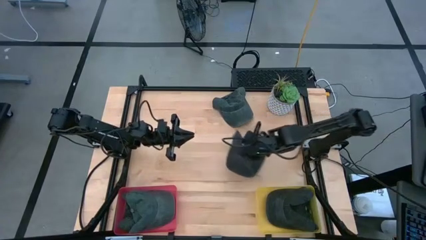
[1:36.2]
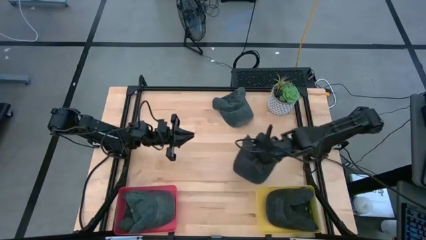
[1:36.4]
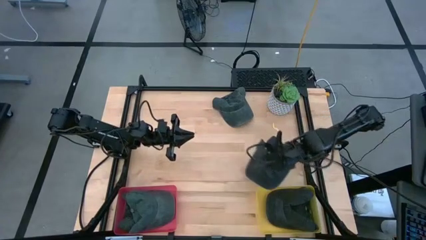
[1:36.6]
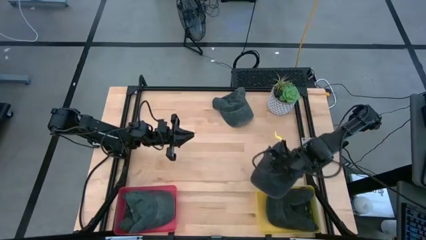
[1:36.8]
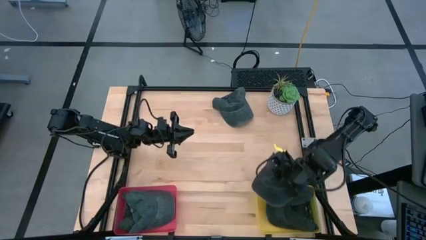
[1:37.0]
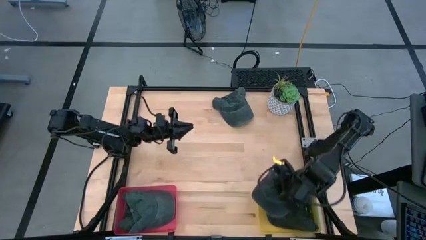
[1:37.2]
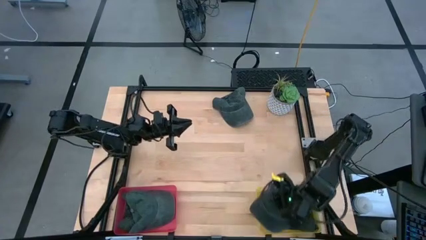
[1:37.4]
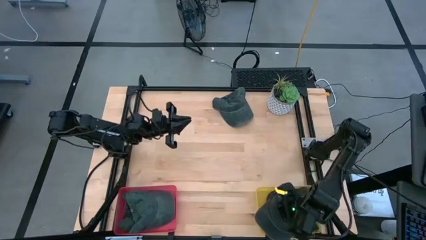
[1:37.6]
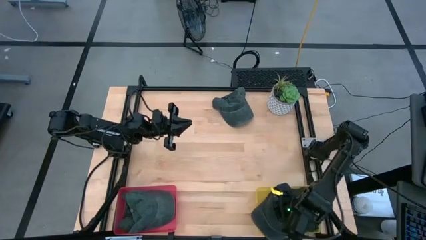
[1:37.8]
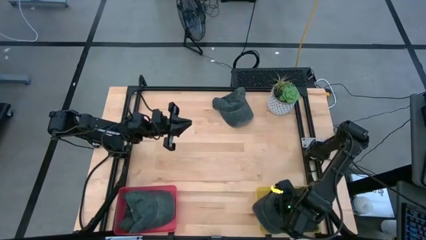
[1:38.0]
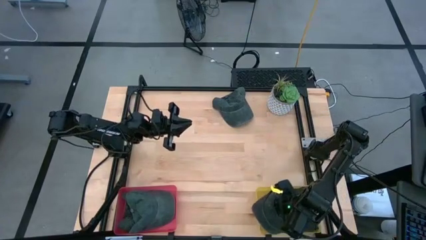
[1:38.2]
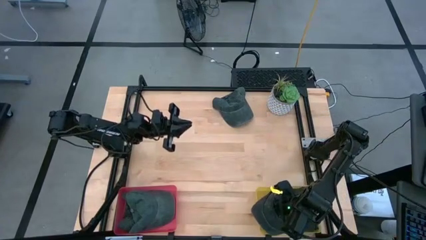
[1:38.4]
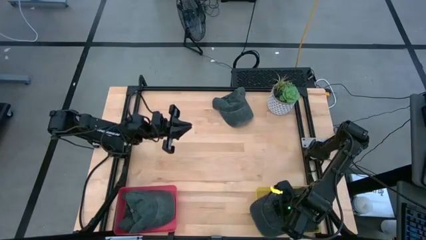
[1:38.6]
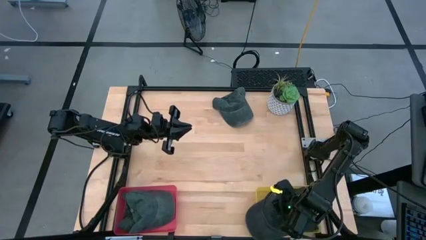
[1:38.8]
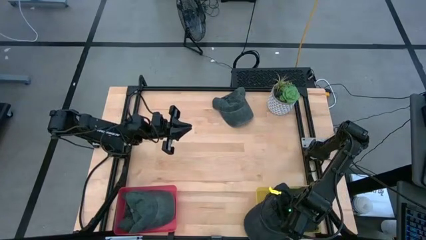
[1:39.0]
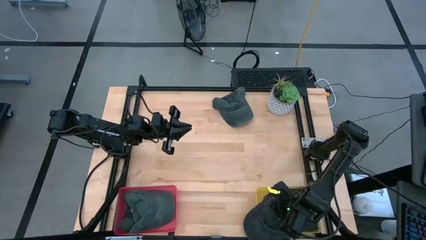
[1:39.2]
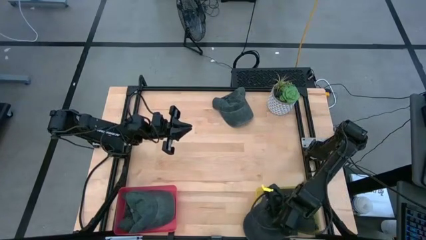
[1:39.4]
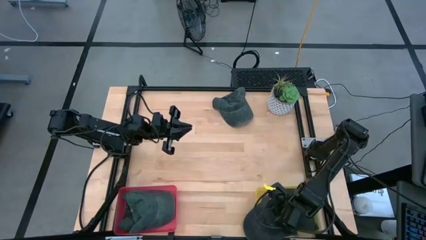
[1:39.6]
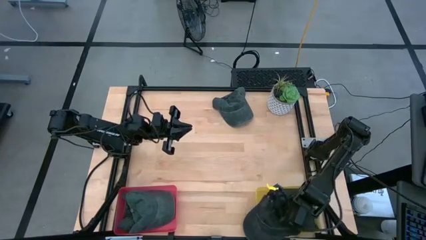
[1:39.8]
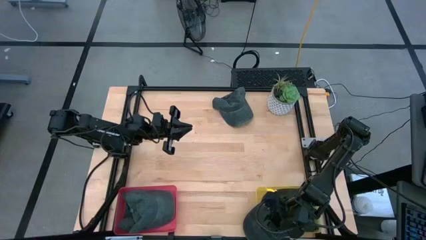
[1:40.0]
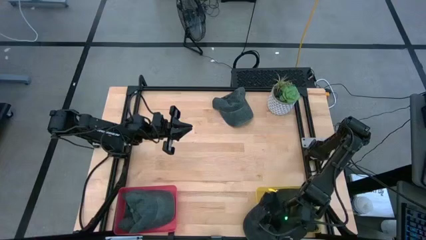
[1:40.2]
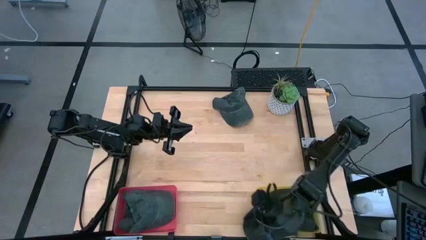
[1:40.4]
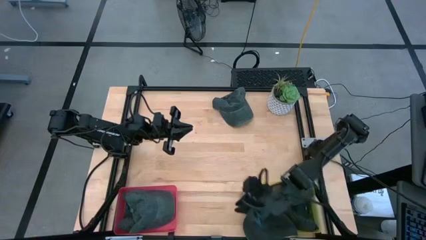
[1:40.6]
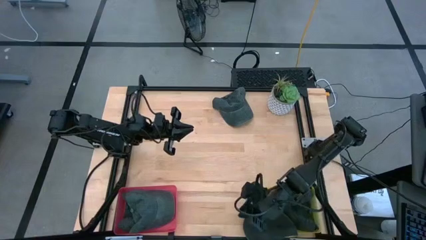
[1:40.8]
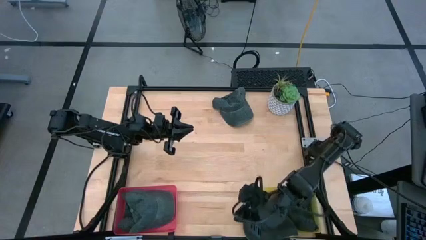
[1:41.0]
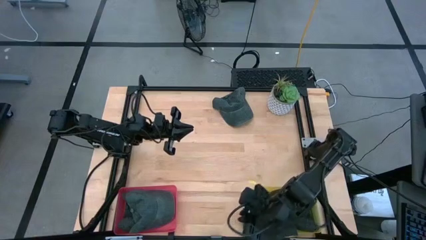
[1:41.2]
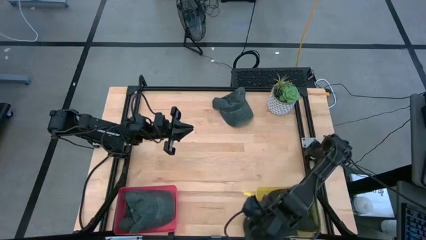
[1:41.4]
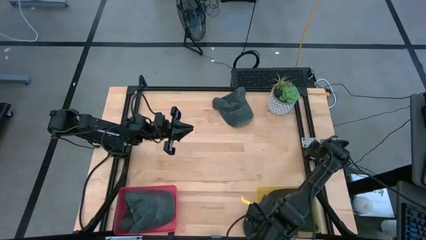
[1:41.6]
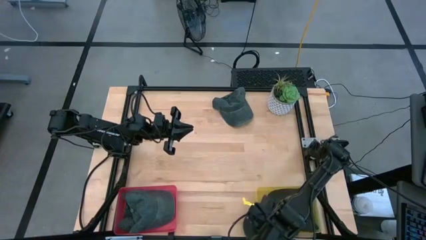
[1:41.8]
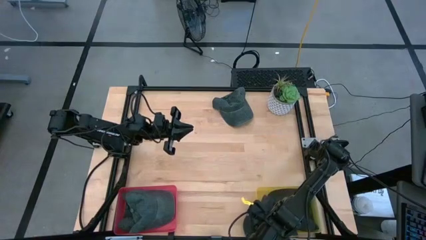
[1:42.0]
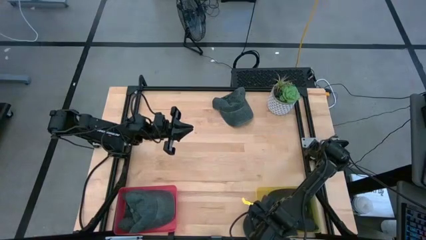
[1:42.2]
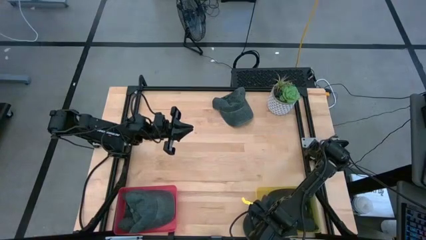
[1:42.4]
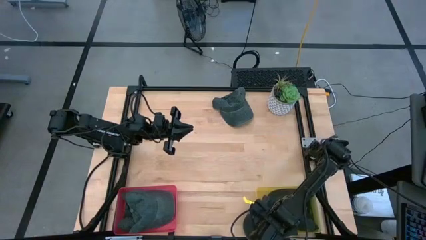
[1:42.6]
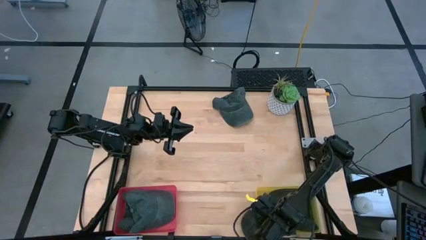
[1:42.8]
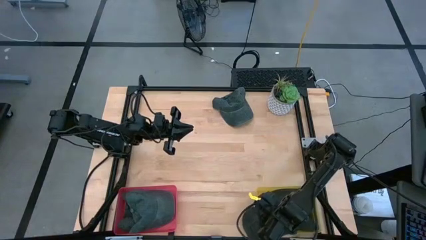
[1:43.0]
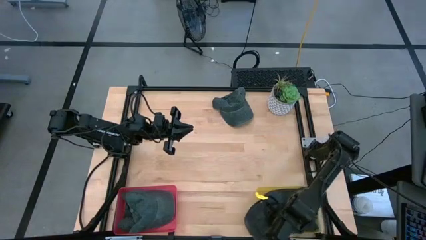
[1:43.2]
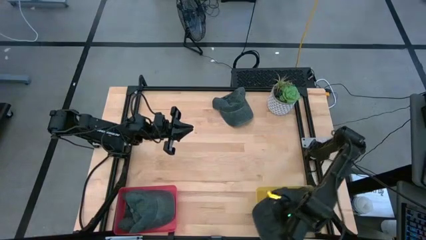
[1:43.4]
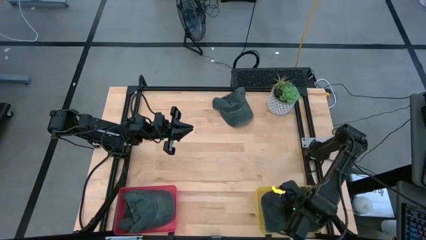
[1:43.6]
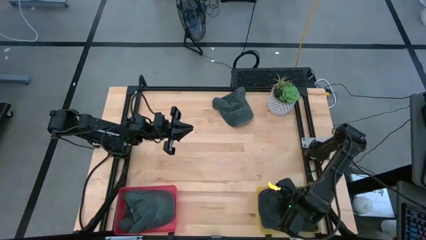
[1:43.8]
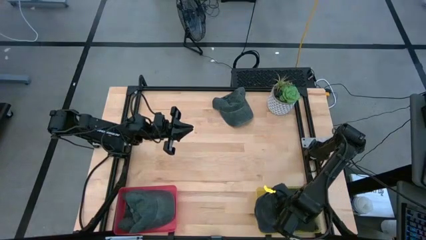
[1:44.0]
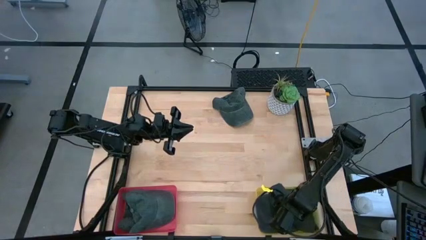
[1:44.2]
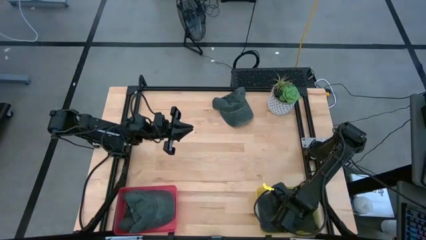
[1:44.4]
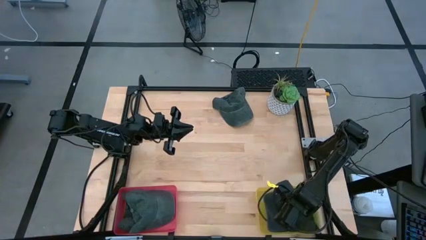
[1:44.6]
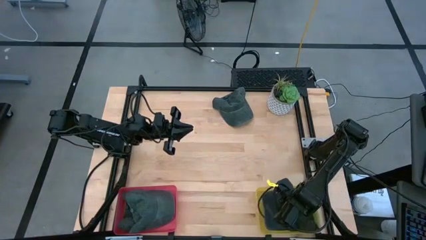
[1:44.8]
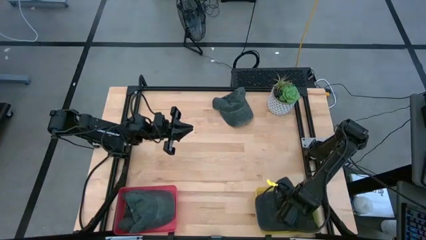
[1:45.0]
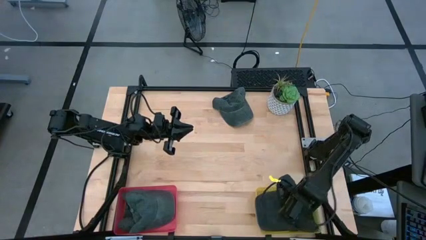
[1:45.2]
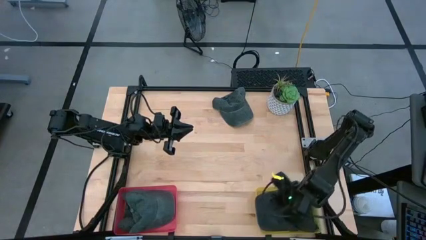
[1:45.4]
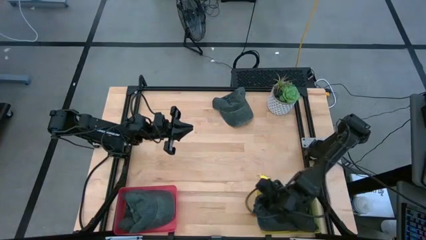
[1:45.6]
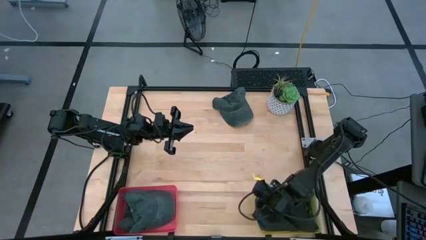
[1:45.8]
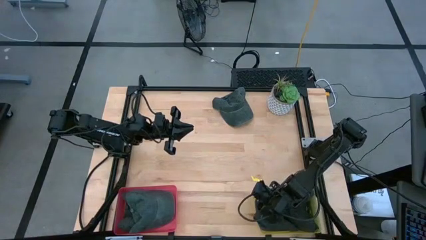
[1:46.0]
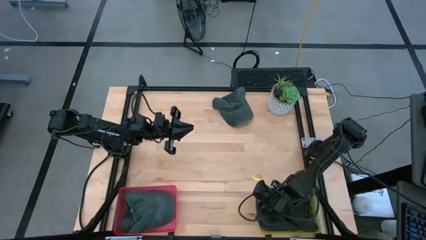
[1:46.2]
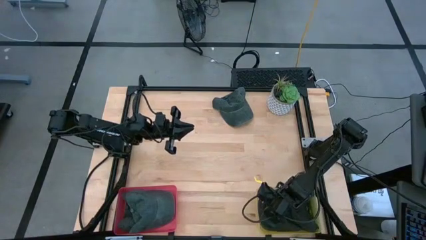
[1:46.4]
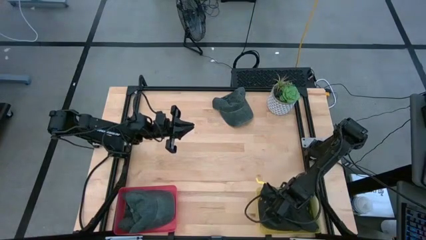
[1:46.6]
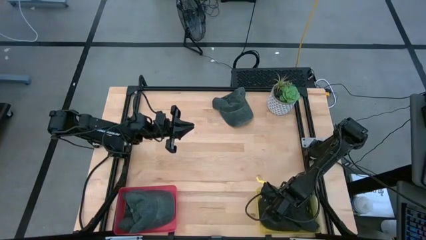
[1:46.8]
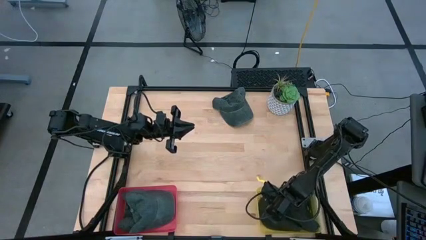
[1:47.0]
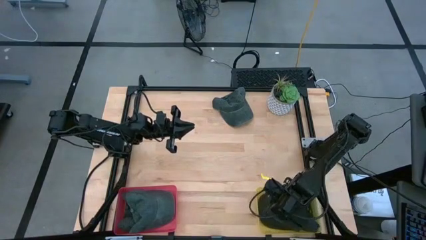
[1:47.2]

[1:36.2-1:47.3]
Task: Pick & Place hat
Put the black cap into the yellow bin

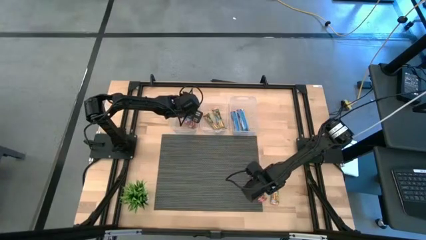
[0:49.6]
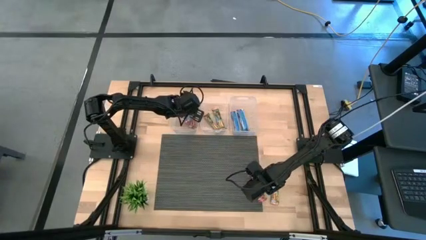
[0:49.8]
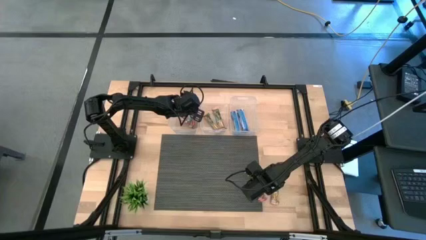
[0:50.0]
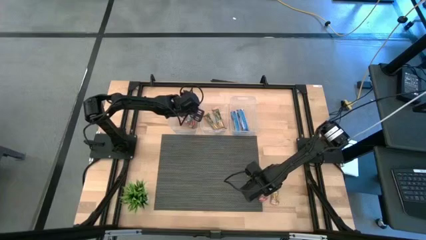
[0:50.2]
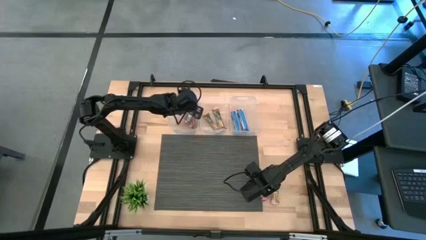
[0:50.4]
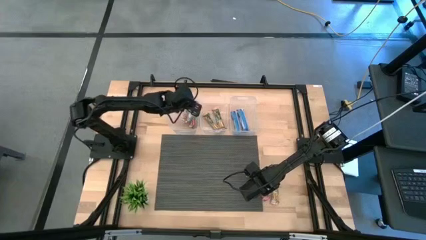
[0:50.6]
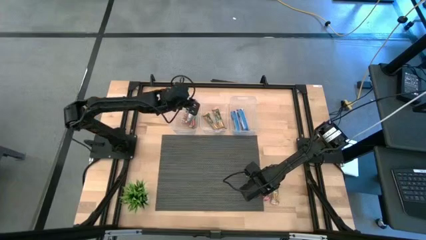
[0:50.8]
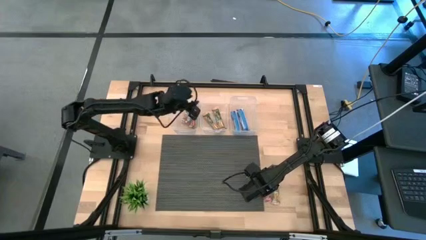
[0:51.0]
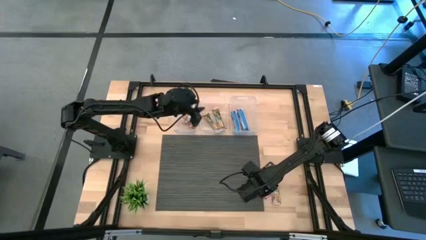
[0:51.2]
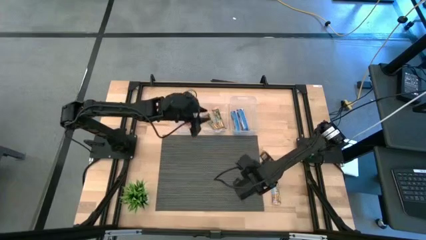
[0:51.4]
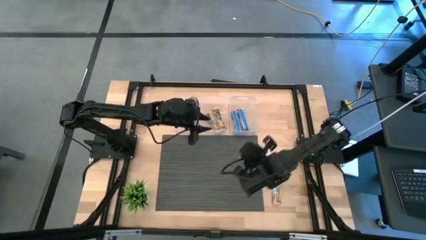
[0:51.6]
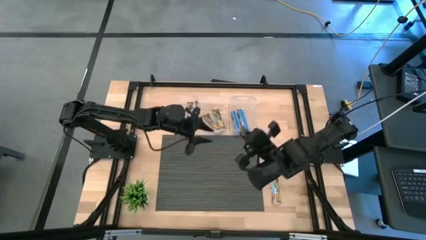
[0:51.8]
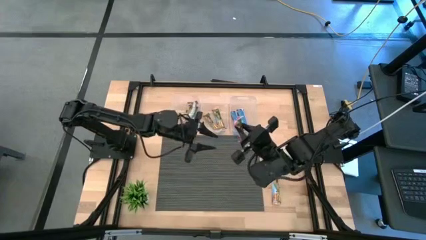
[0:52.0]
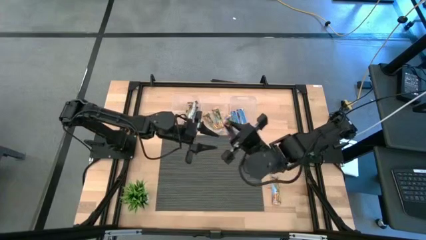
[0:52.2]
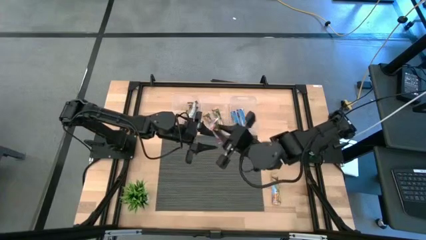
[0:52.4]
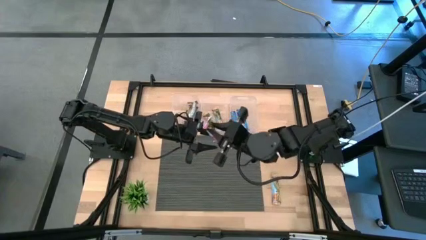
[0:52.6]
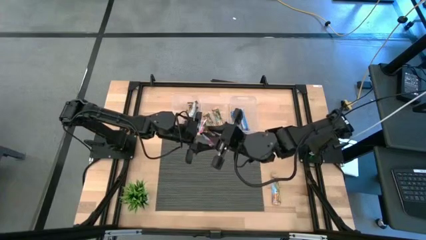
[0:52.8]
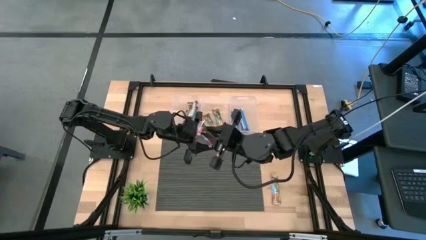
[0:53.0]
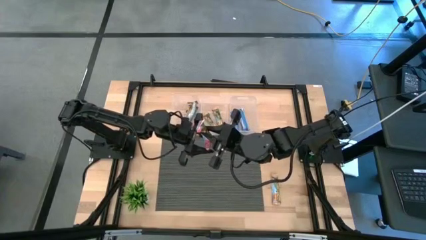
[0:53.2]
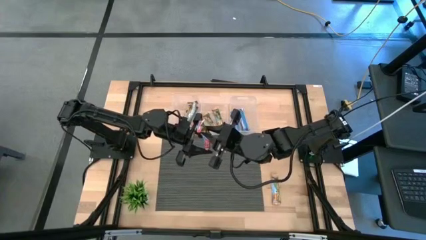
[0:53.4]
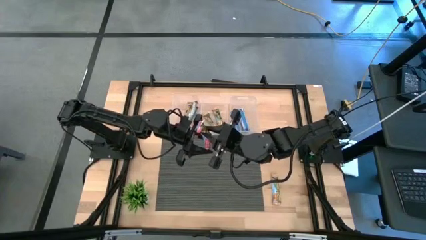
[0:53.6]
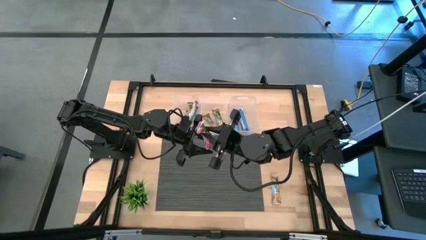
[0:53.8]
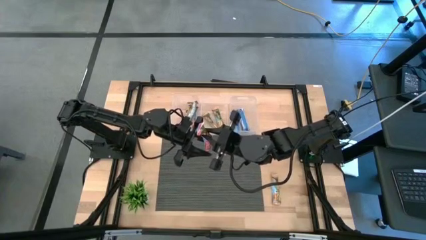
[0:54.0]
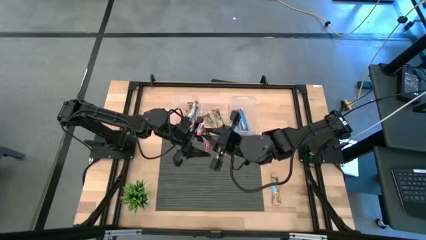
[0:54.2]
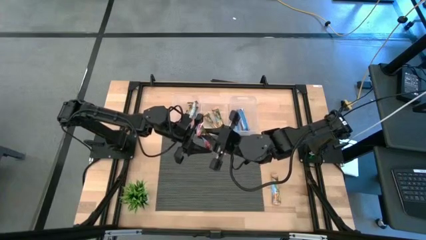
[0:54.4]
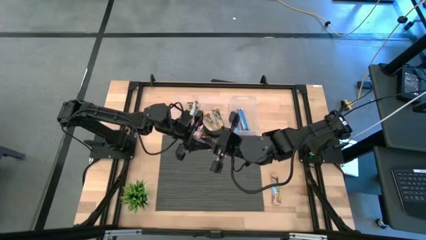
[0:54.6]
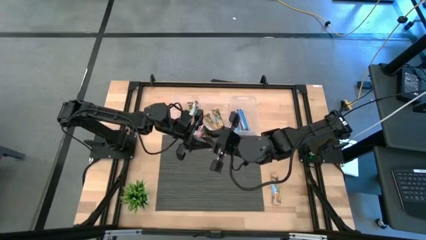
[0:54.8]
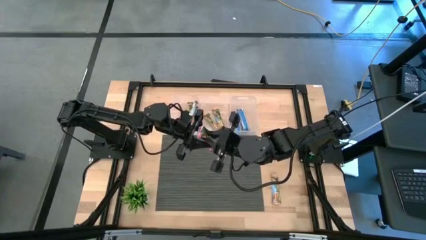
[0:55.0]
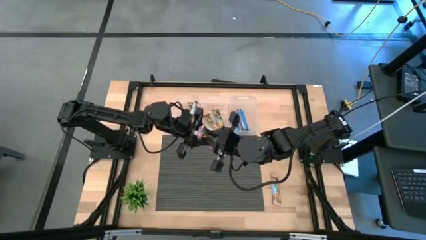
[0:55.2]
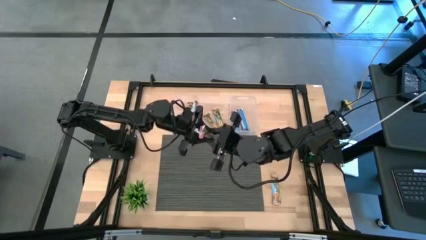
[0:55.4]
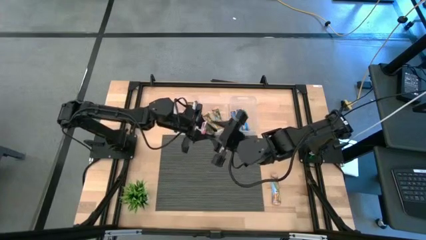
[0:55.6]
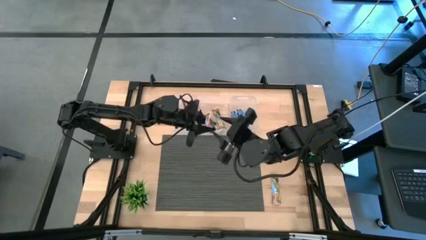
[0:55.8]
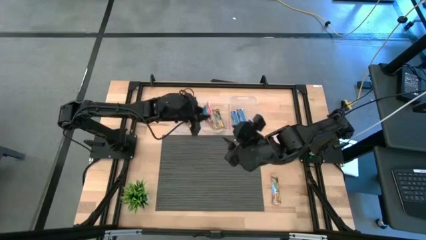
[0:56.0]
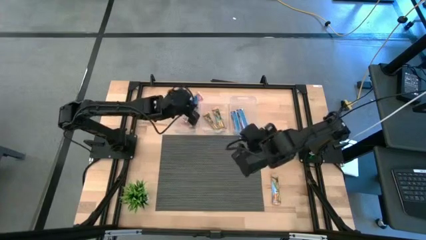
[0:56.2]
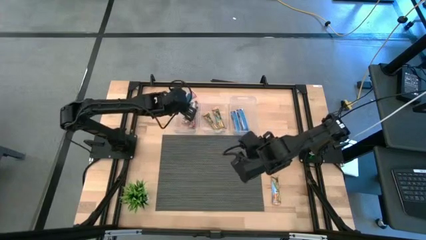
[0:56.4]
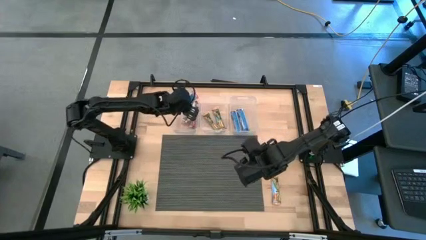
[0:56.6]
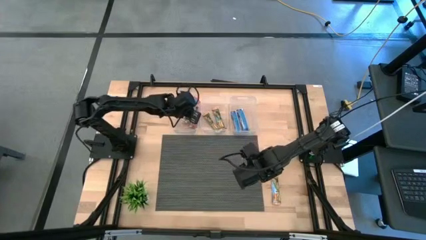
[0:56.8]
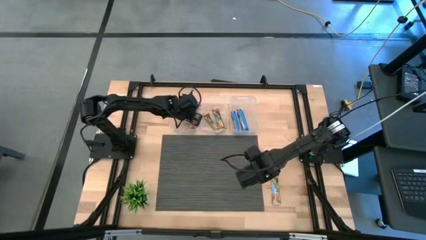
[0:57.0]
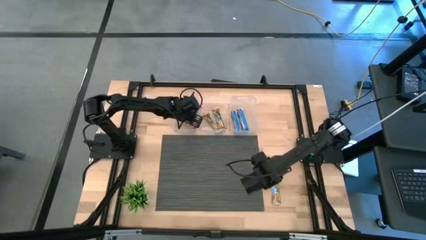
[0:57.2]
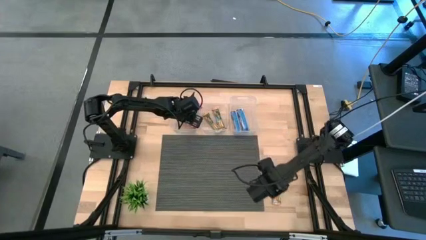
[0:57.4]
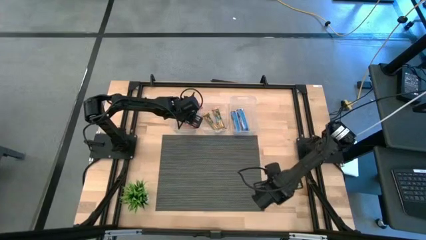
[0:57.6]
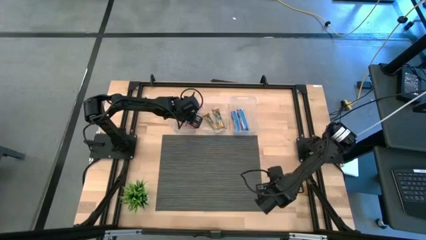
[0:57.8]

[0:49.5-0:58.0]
Task: Pick and place Granola Bars by type
Put the red granola bar into the left transparent bin
